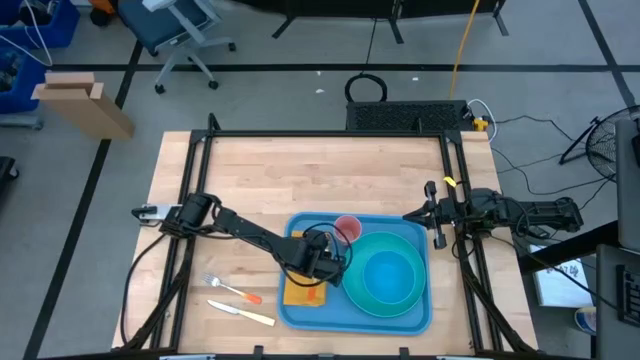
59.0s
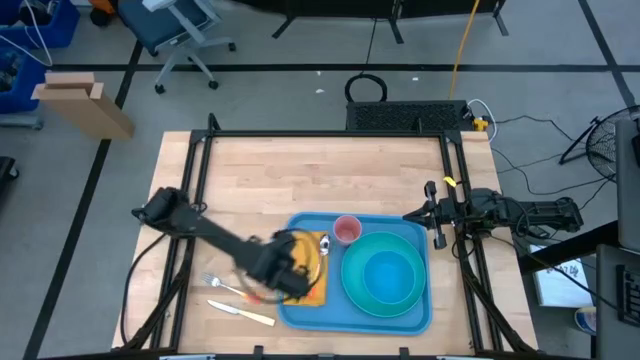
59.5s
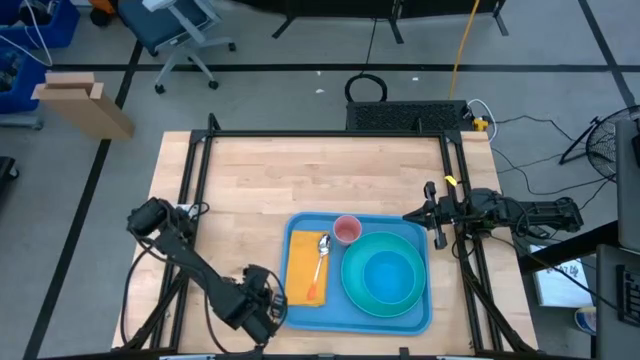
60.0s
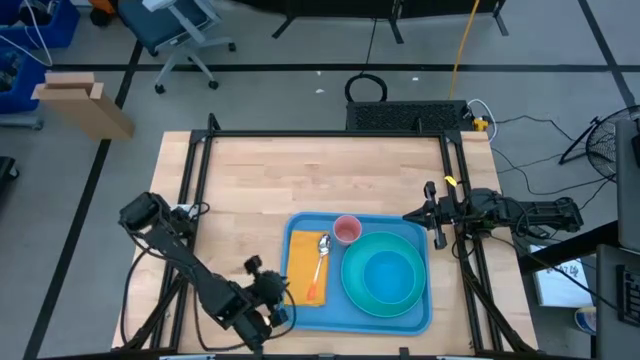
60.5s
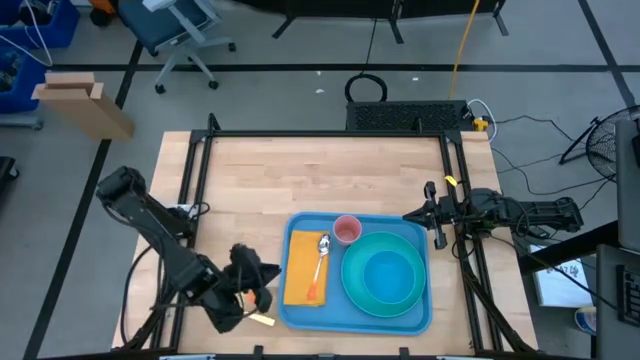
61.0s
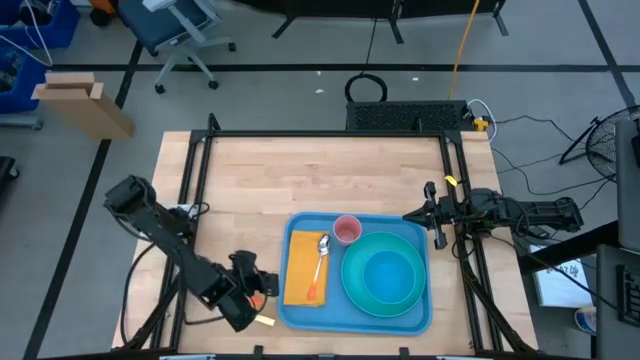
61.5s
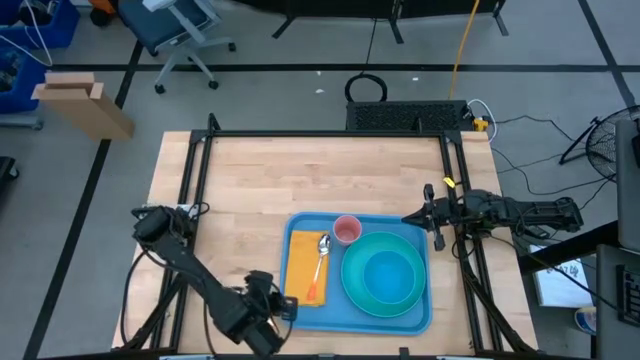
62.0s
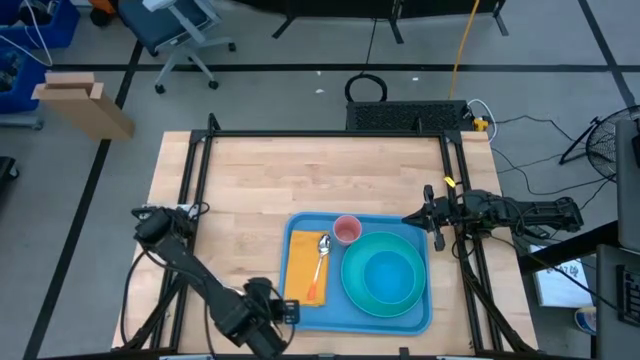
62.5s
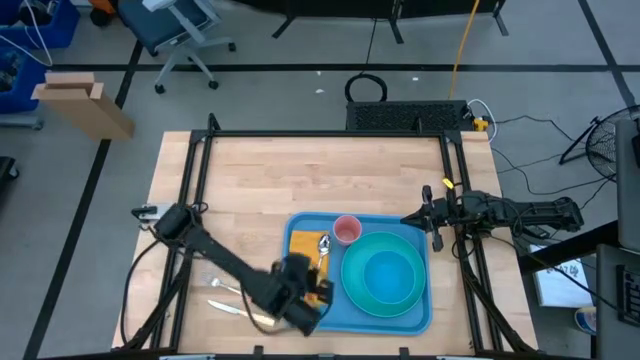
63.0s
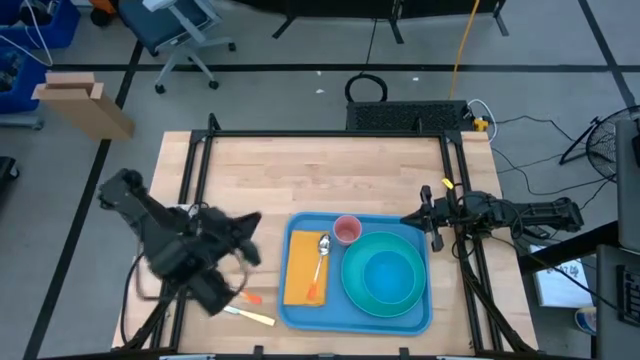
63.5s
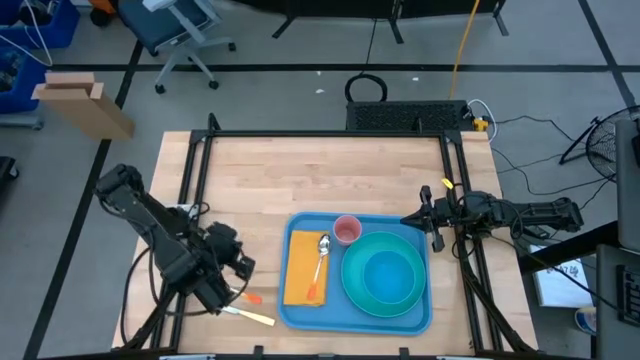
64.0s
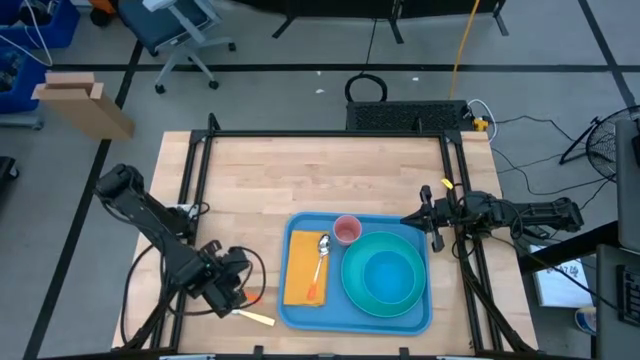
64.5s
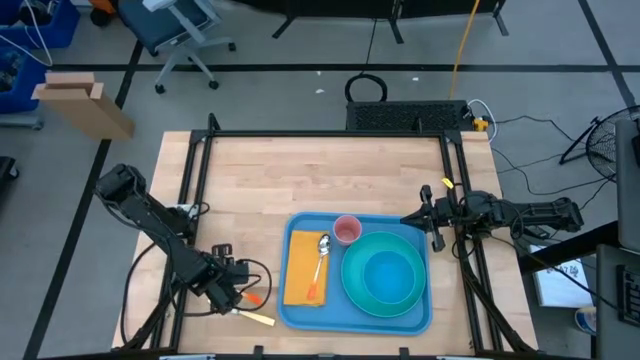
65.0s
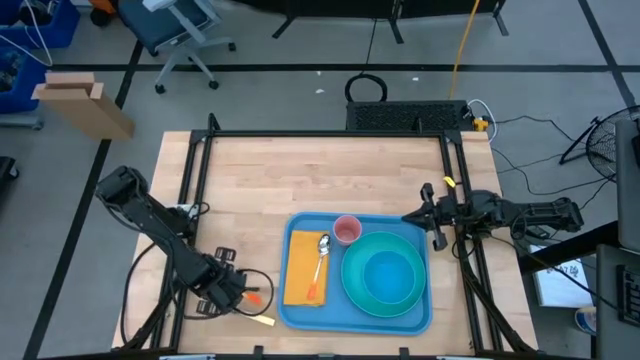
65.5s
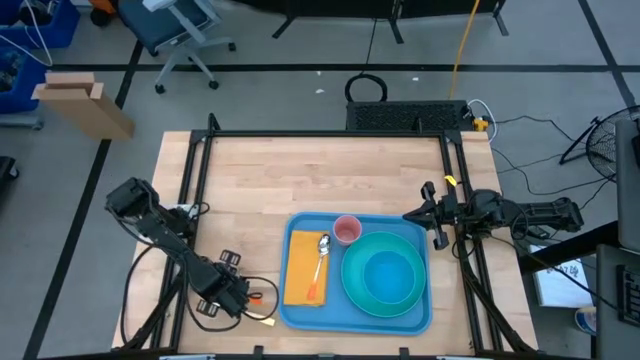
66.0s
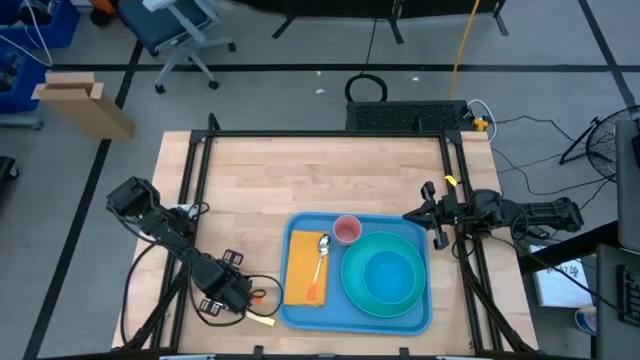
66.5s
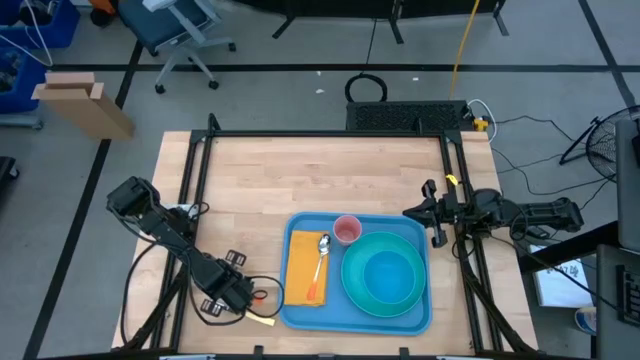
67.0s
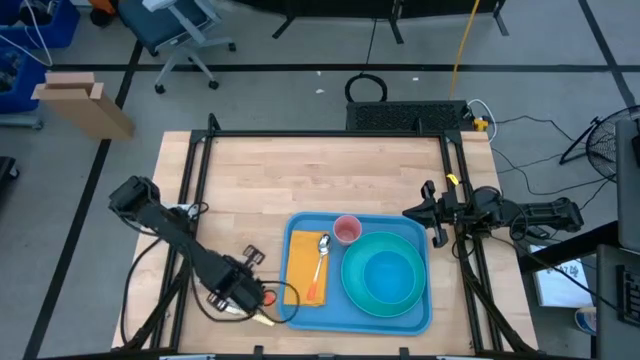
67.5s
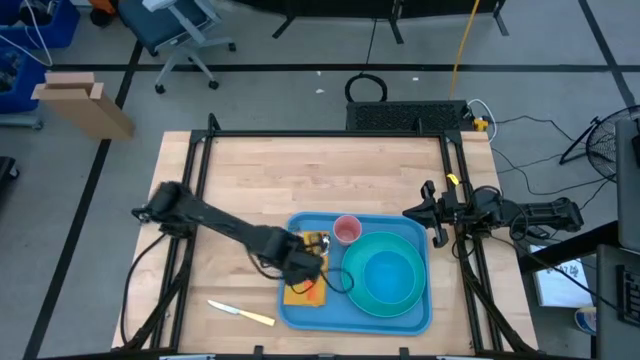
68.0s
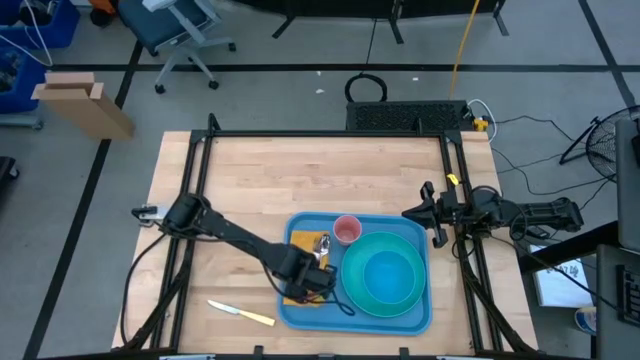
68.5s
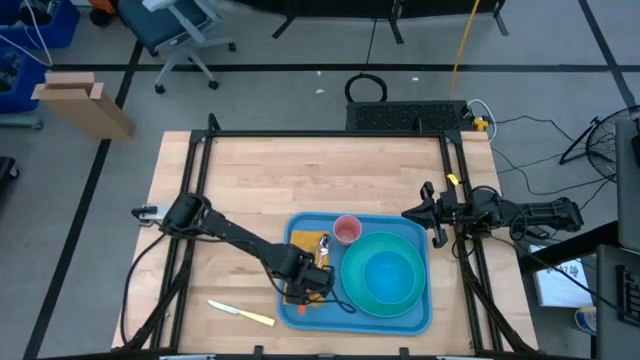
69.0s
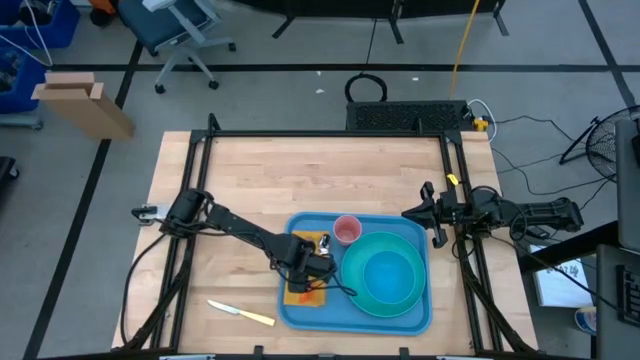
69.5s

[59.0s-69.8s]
Task: Set up tray
Put the orange fork to the left of the orange spoon on the yellow napkin

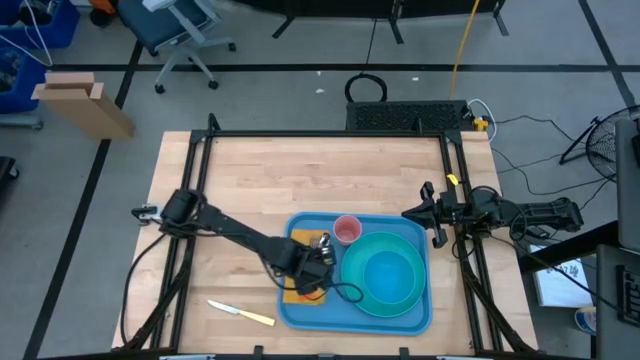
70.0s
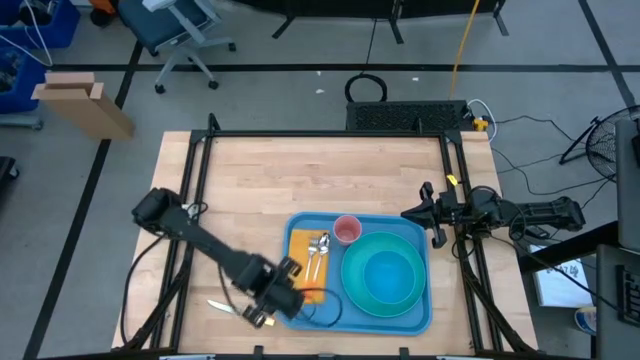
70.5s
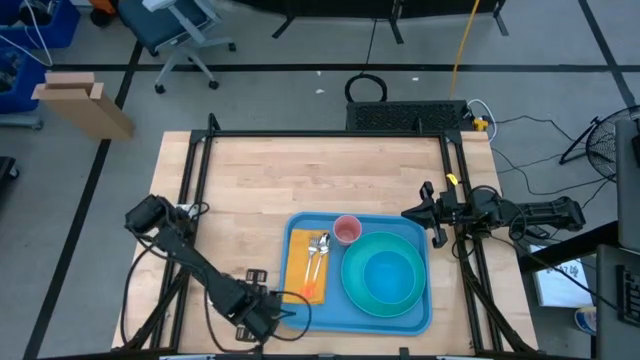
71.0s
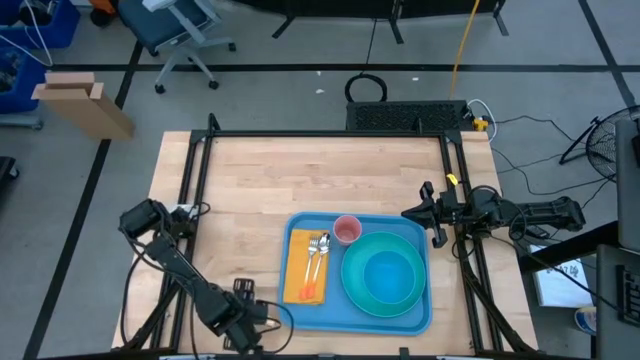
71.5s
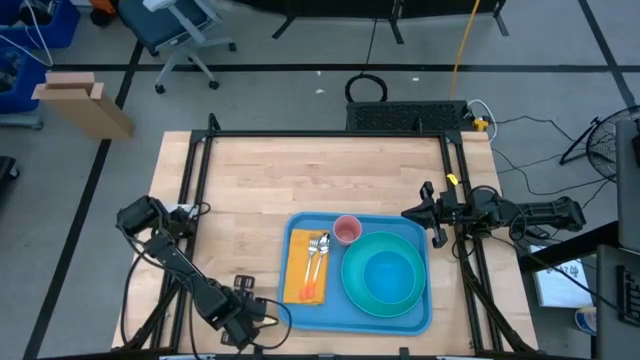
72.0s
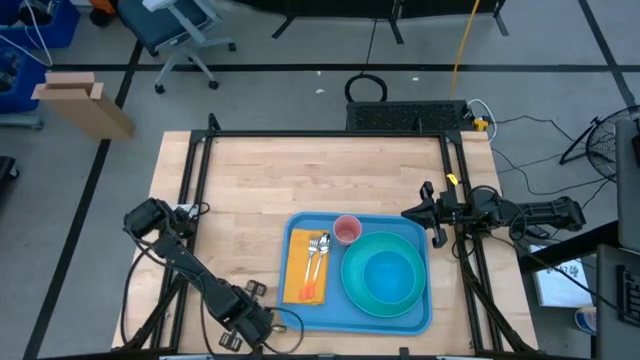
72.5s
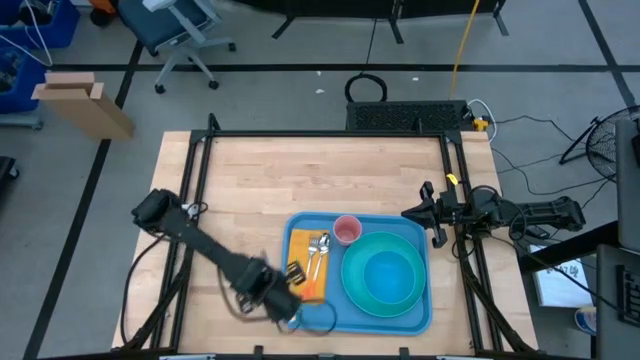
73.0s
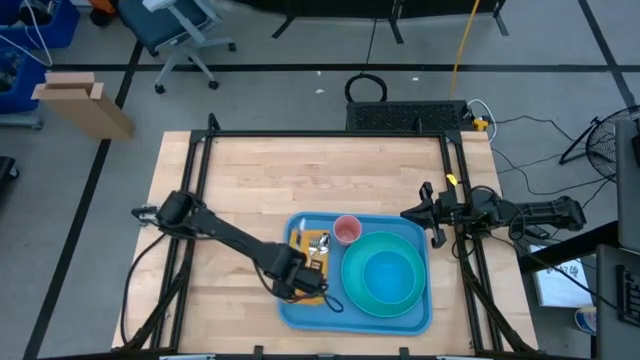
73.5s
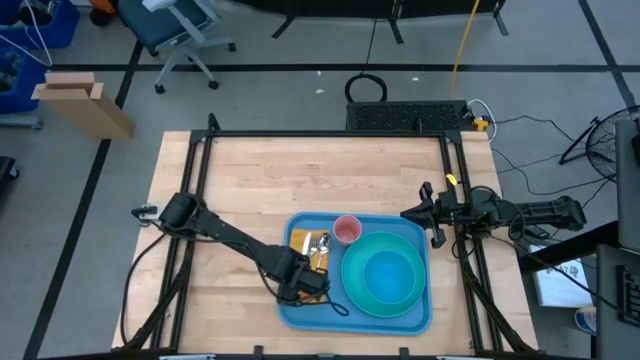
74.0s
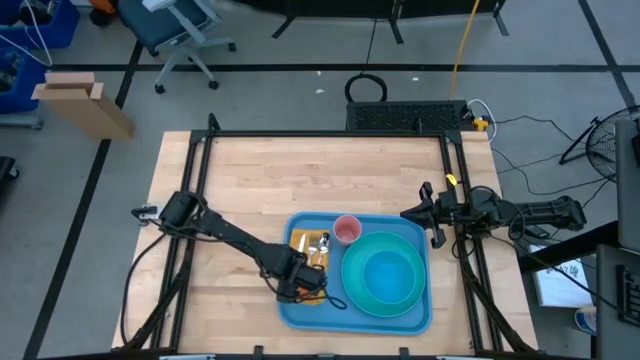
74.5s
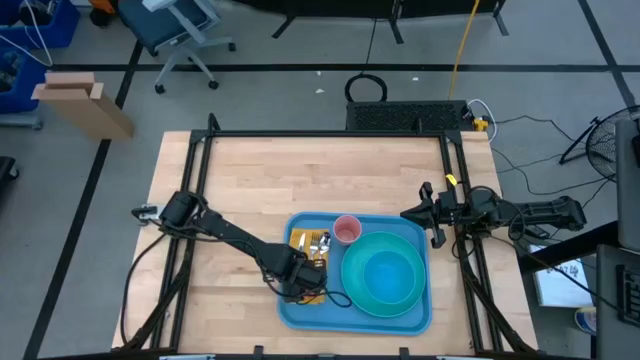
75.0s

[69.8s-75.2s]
Put the light yellow knife to the left of the orange fork on the yellow napkin

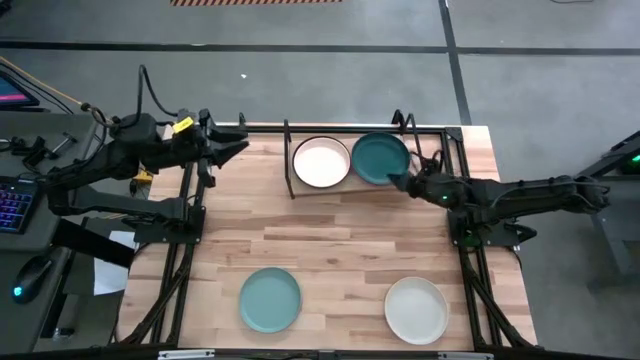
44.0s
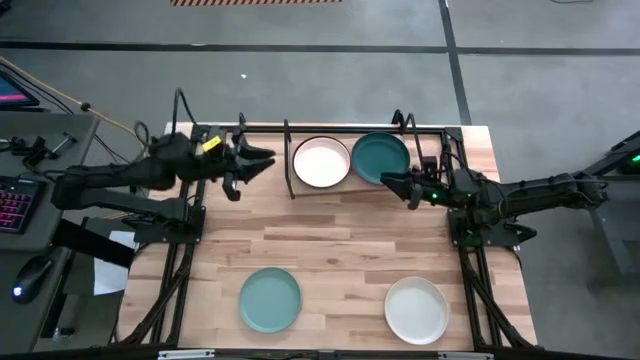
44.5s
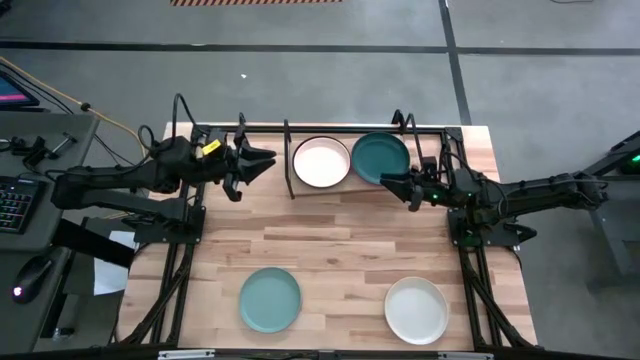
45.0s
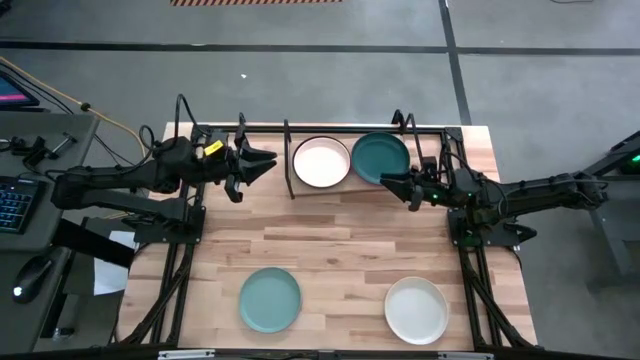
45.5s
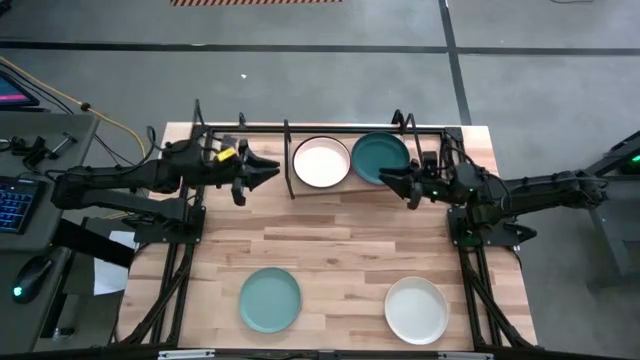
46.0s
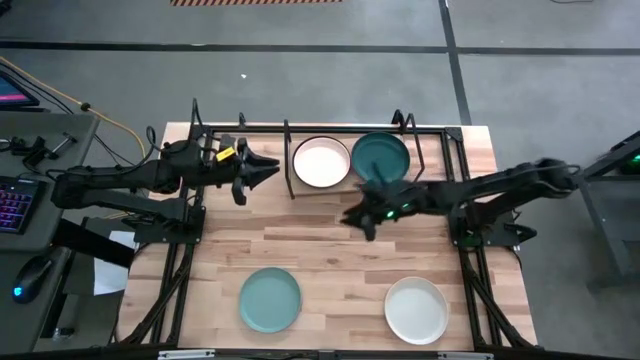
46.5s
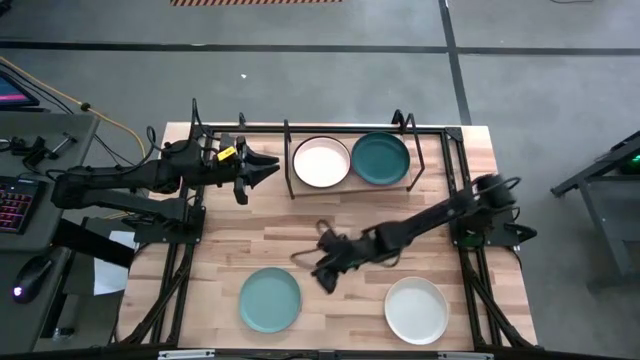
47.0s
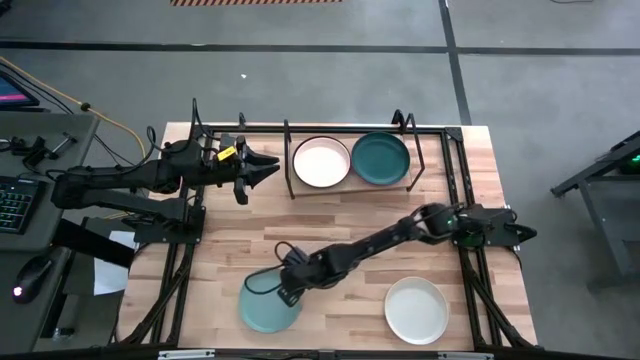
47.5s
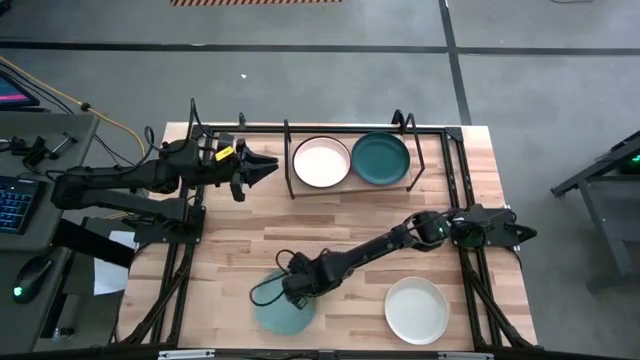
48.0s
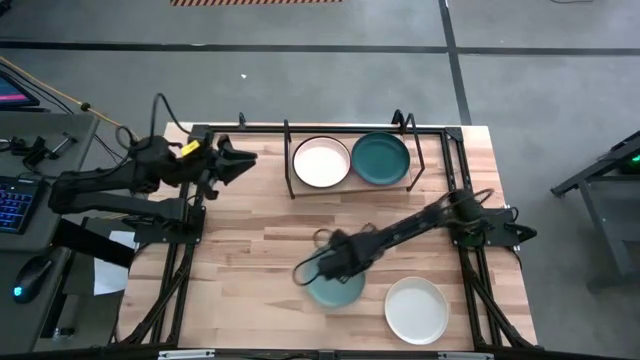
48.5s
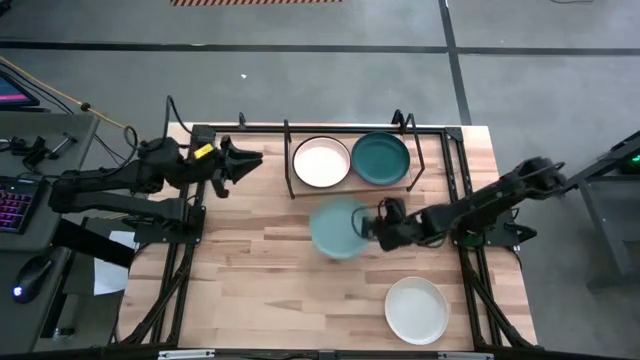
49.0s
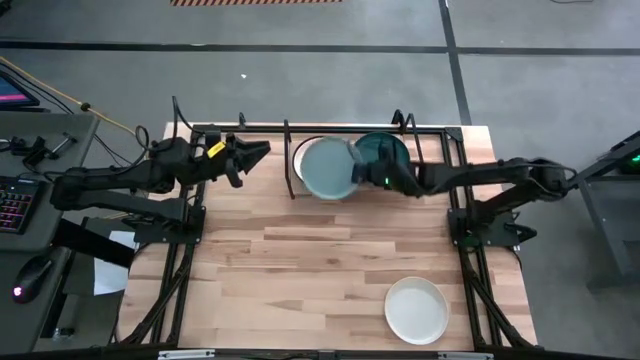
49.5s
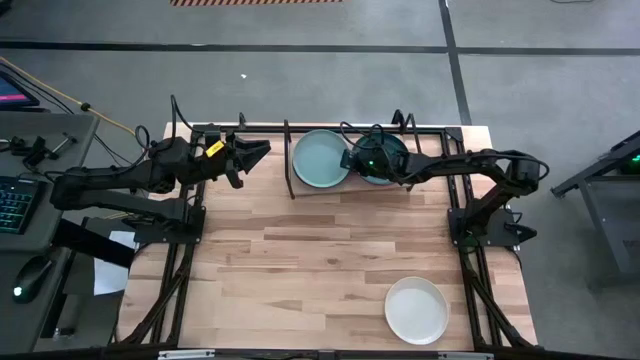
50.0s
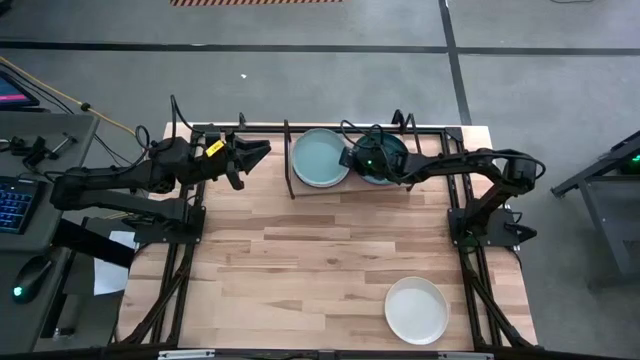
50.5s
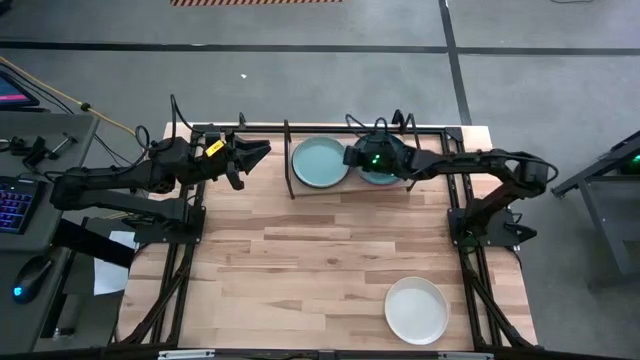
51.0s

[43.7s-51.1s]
Task: Place and stack plates onto a shelf
Stack the blue plate on top of the light pink plate on the shelf
